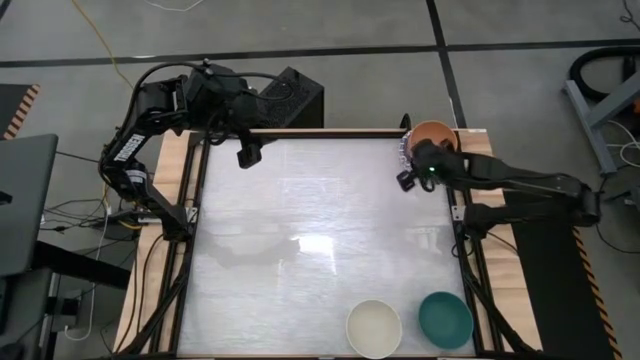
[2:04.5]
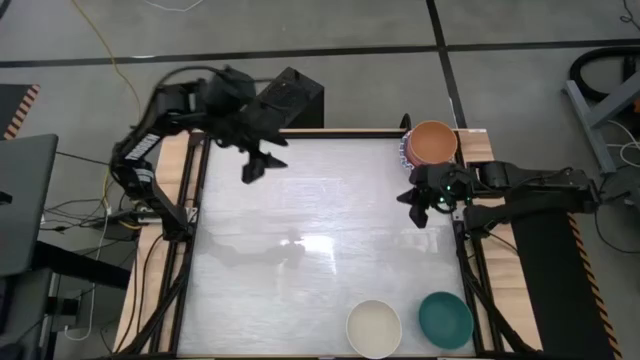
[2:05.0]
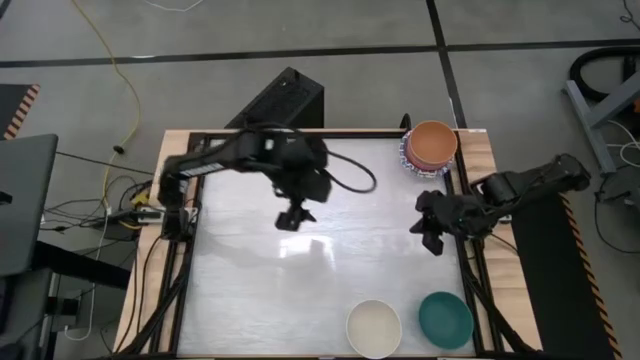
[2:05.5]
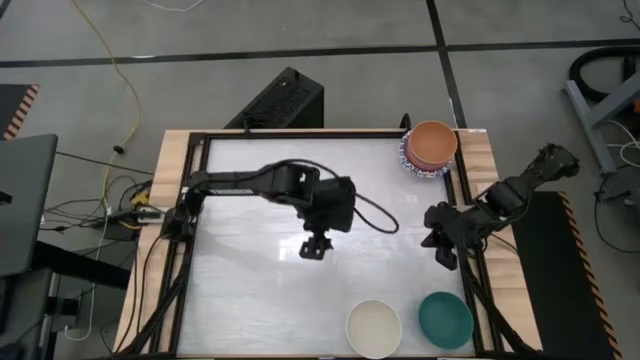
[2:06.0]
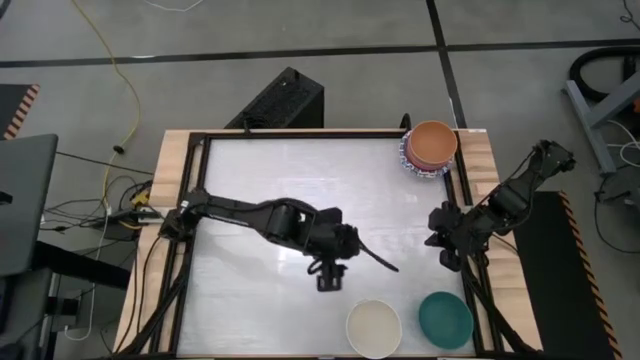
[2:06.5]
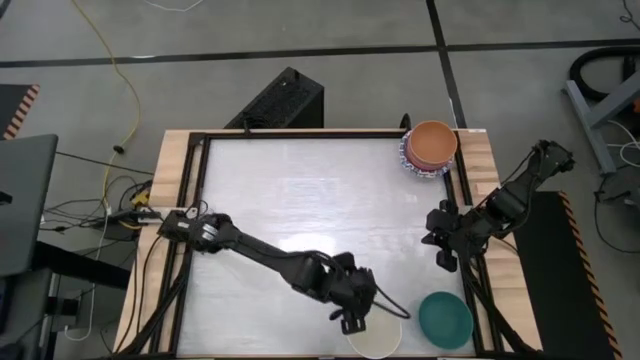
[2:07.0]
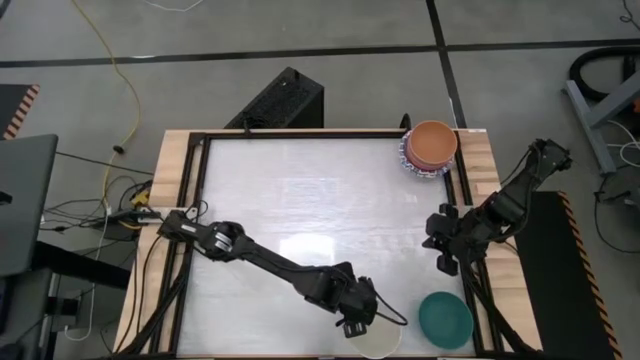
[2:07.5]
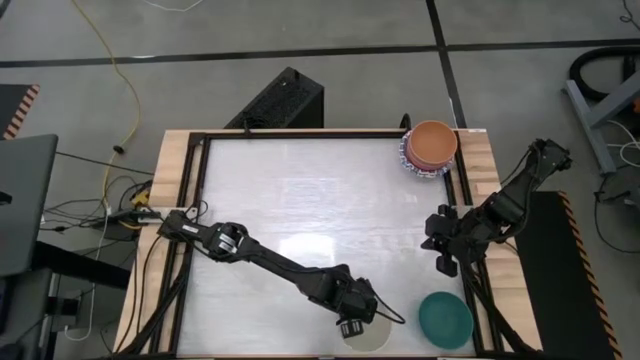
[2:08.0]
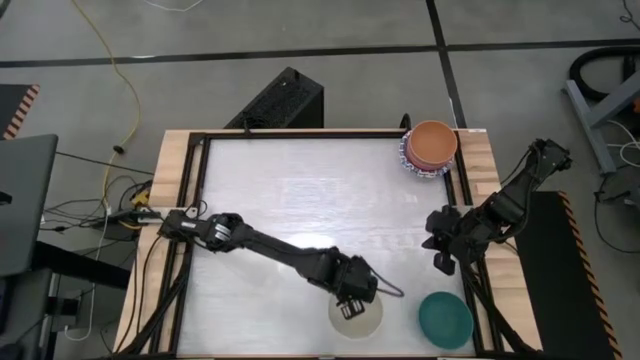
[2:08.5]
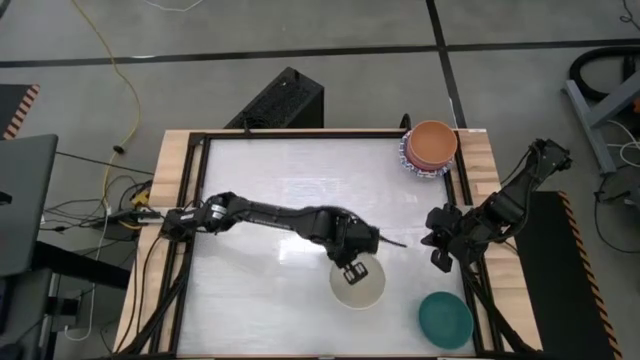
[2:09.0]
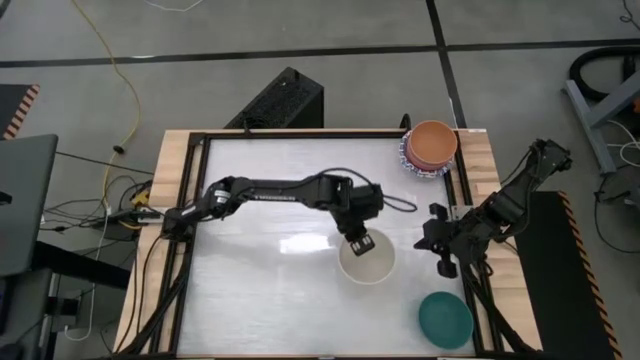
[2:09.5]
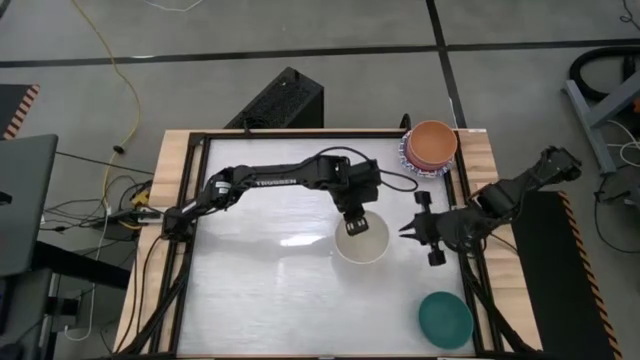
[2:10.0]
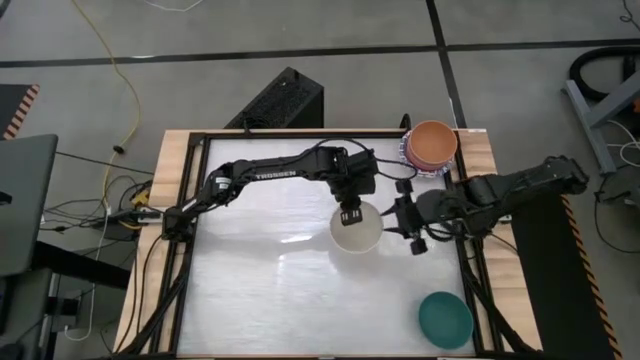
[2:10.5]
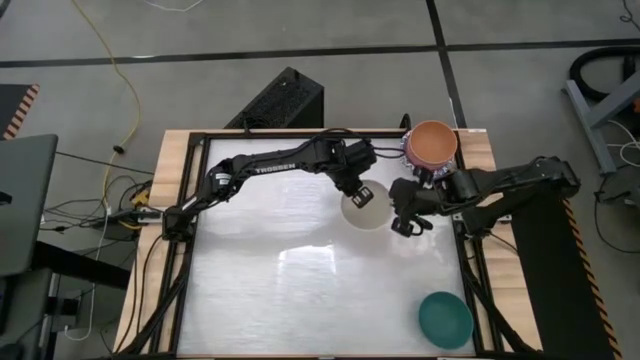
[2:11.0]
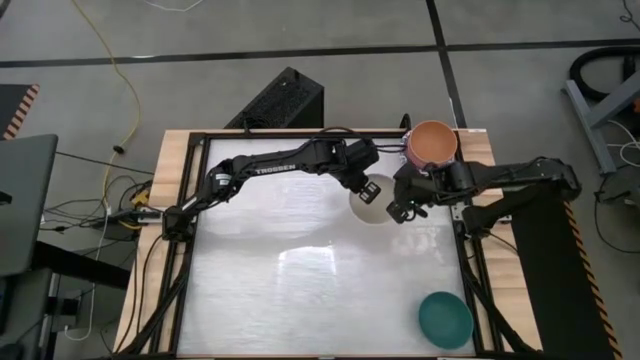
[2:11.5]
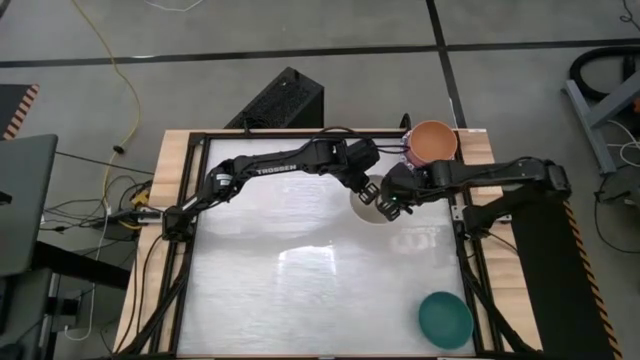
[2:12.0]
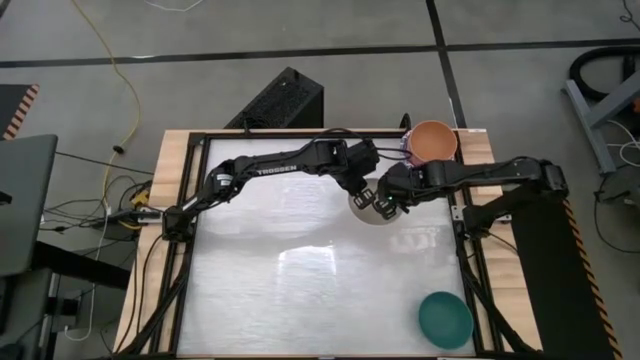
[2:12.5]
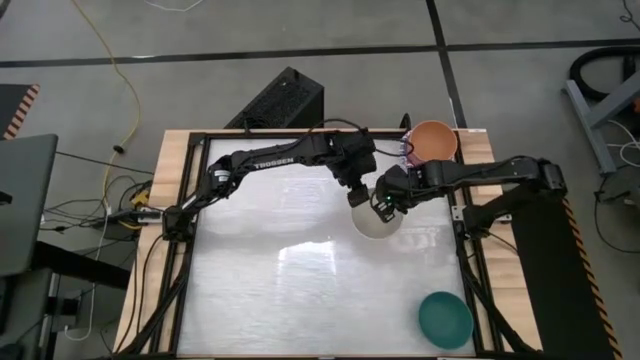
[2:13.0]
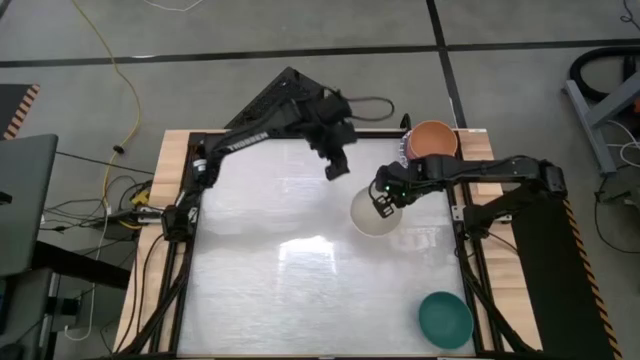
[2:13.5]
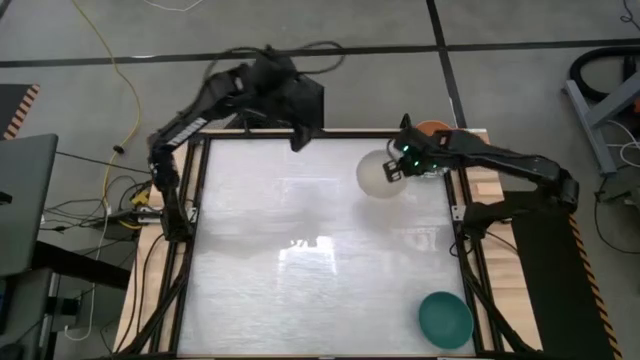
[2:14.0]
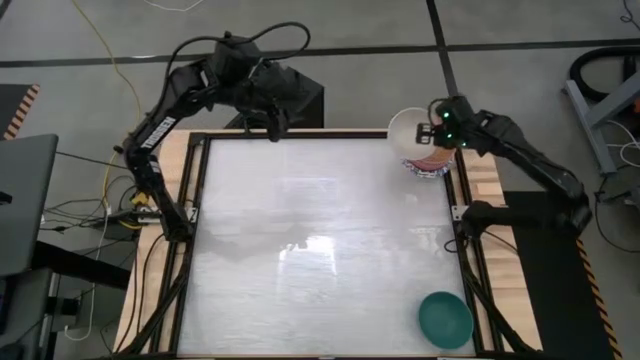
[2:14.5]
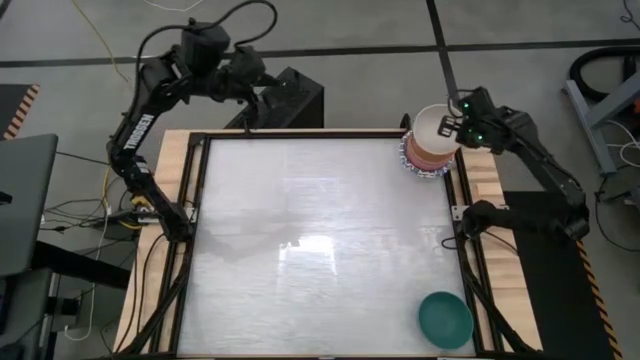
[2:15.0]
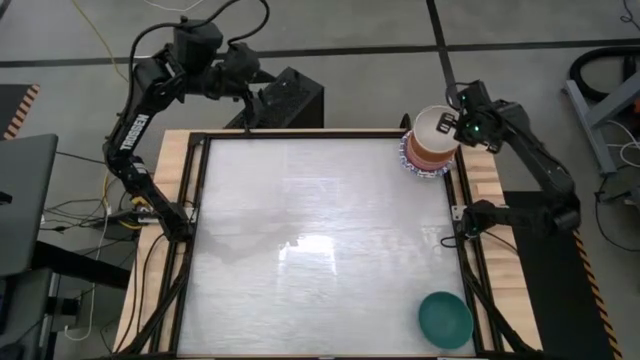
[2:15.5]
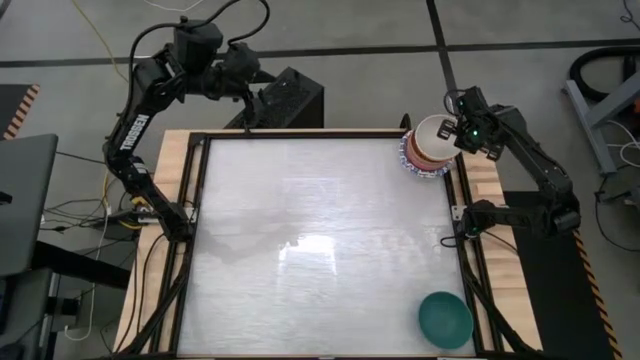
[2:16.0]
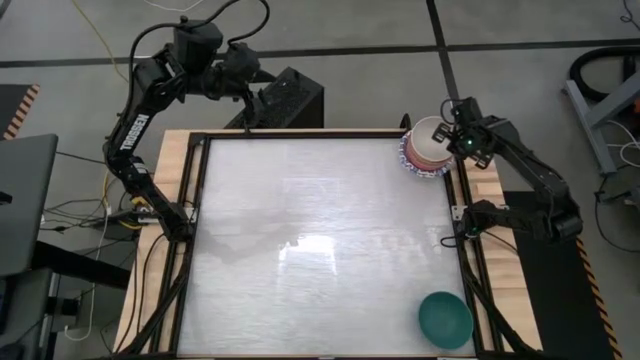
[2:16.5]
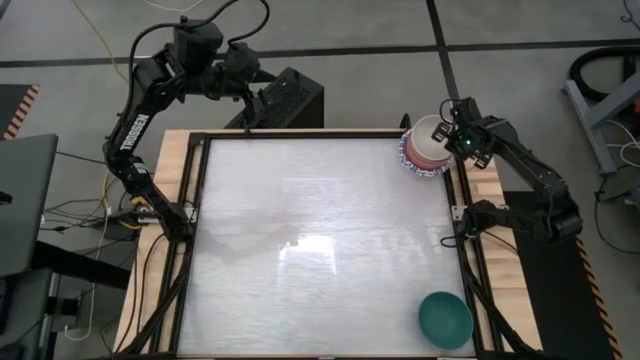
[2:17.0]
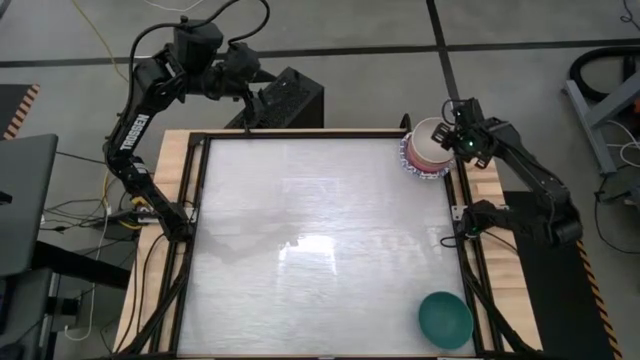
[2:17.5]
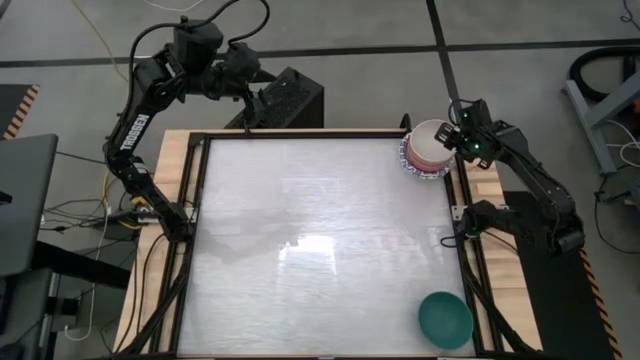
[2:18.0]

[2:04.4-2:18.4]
Stack the white bowl on top of the brown bowl

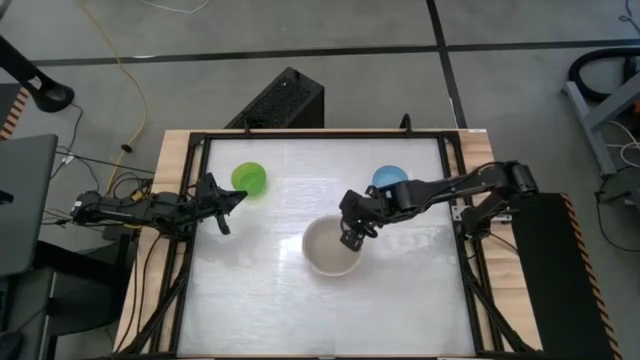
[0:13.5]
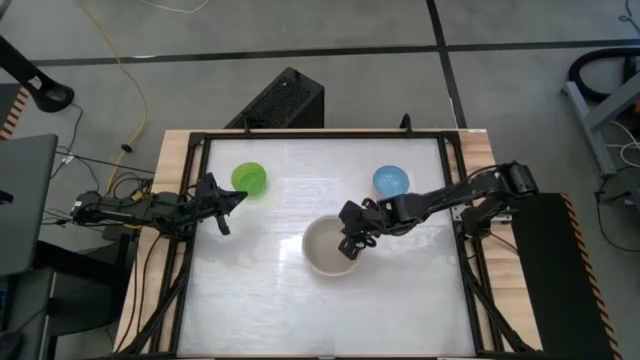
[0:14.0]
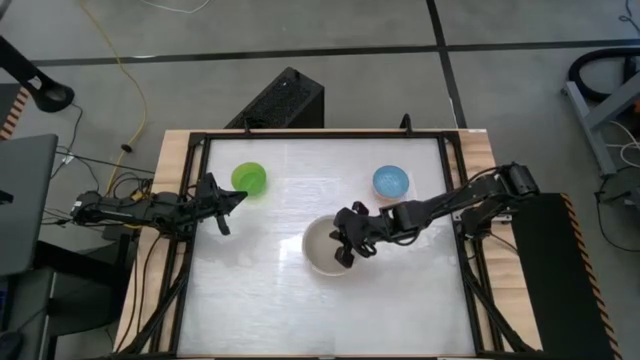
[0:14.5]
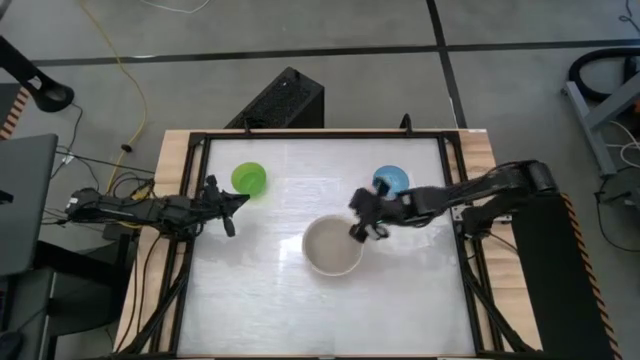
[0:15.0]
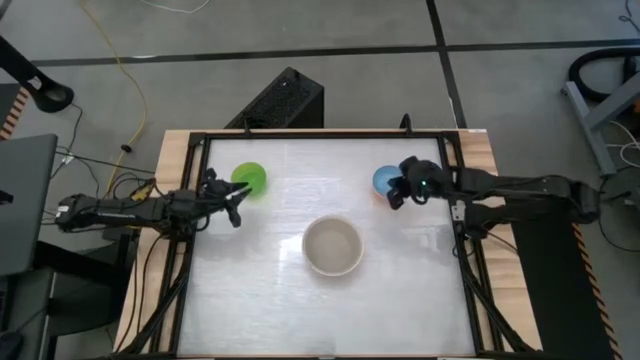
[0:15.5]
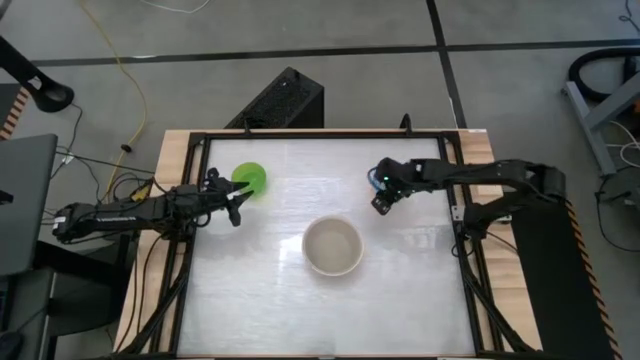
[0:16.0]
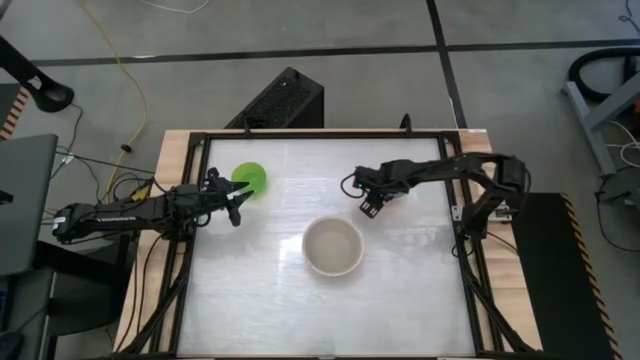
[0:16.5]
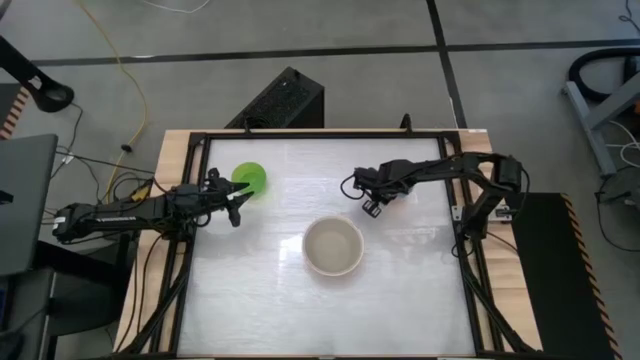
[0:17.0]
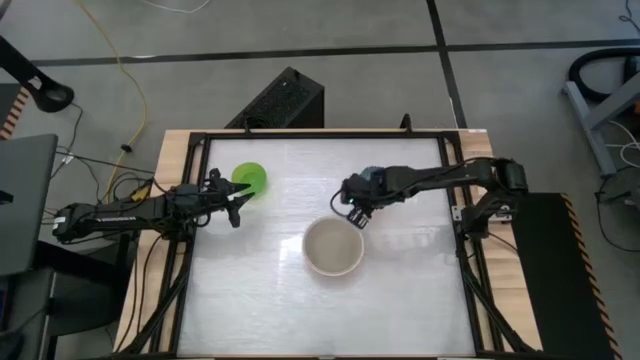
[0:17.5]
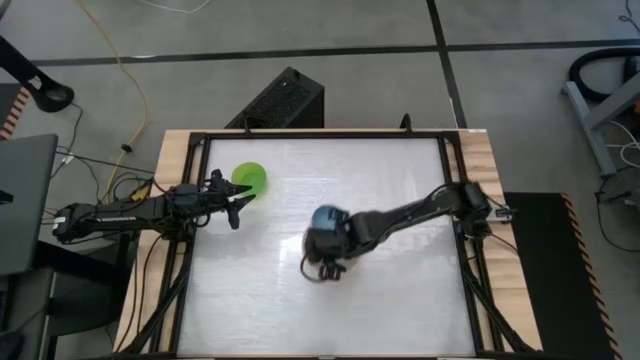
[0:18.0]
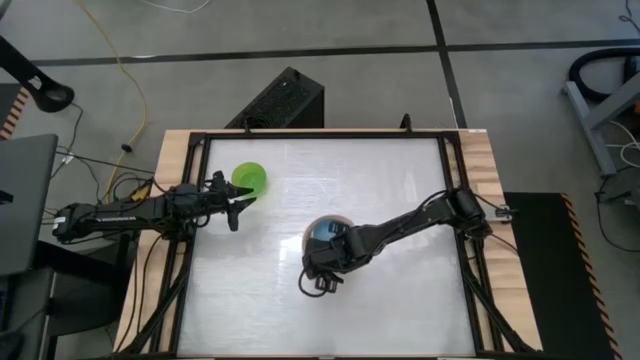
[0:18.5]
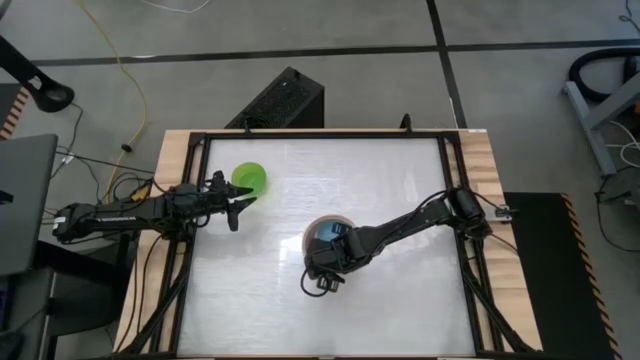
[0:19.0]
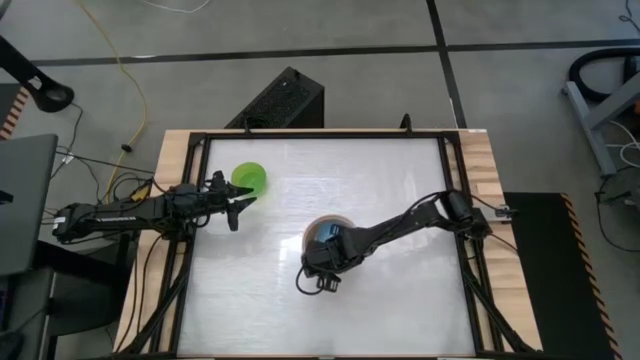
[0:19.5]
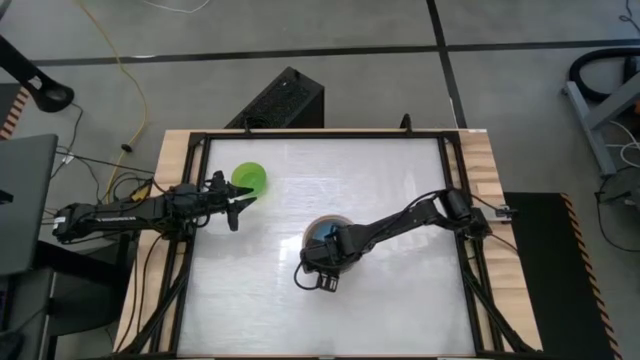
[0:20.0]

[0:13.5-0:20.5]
Stack the blue bowl on top of the gray bowl
